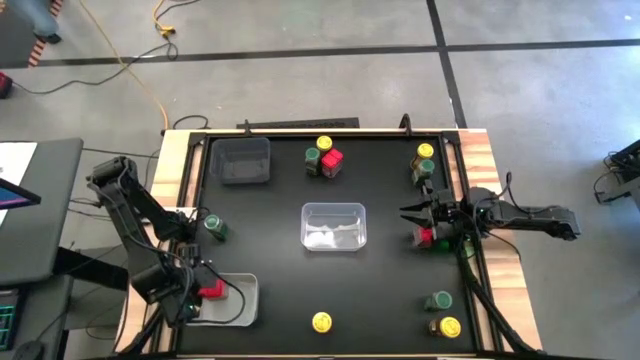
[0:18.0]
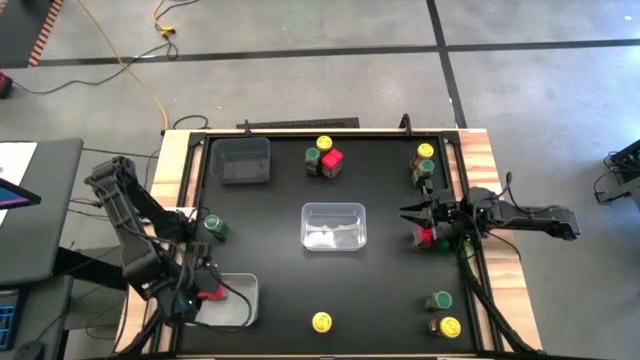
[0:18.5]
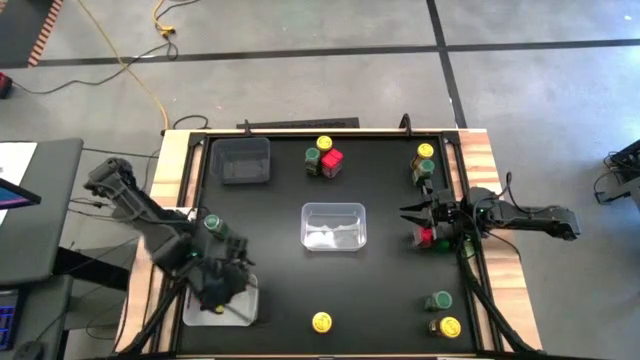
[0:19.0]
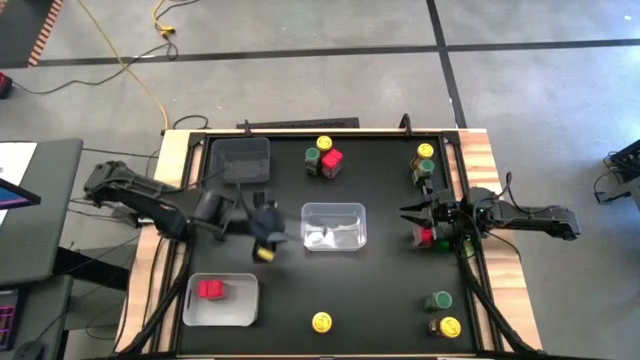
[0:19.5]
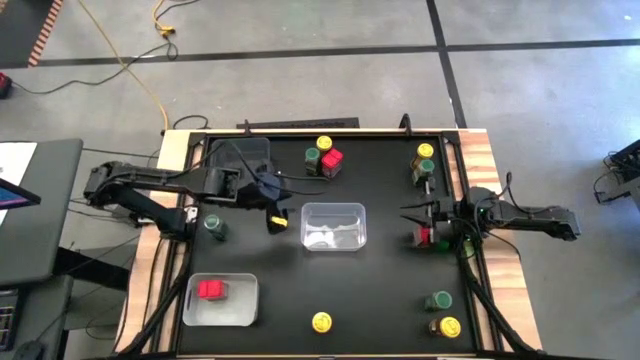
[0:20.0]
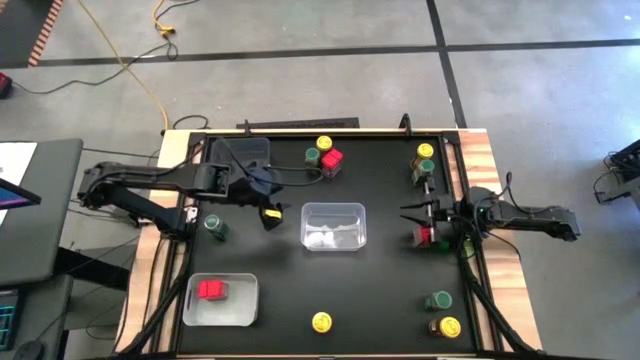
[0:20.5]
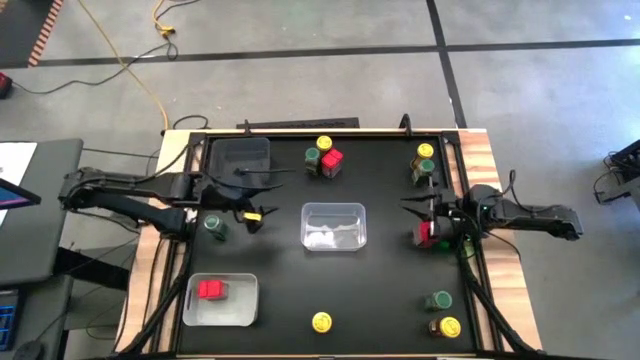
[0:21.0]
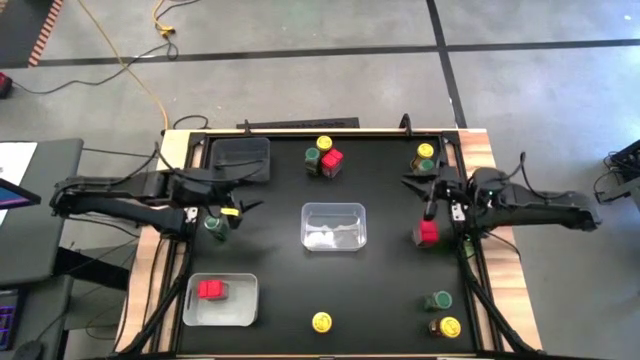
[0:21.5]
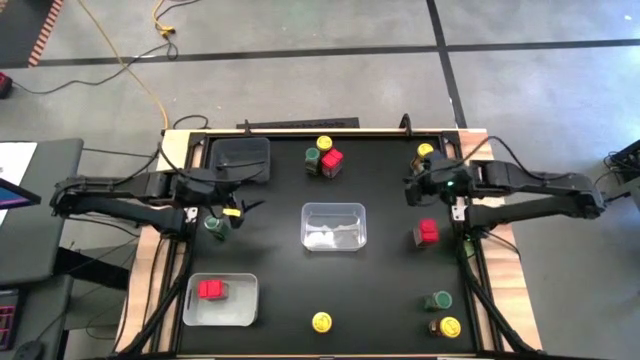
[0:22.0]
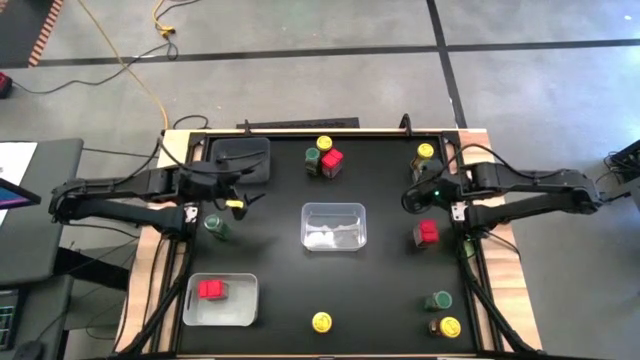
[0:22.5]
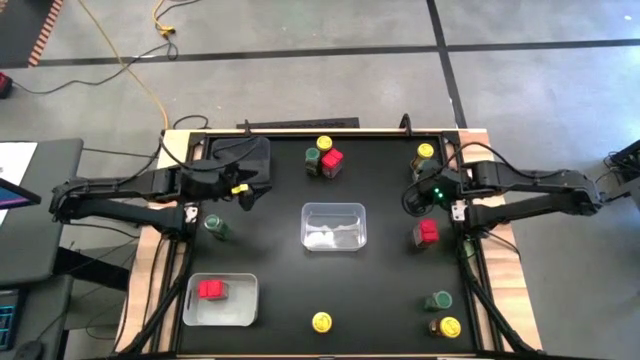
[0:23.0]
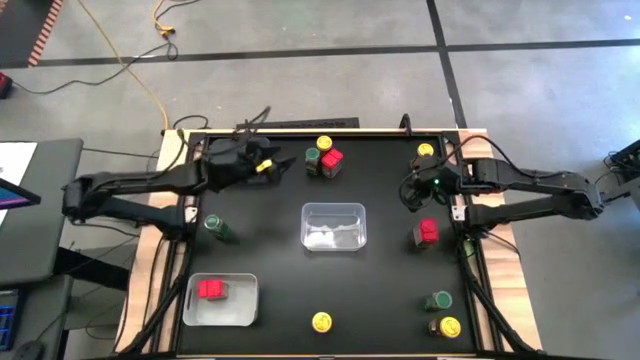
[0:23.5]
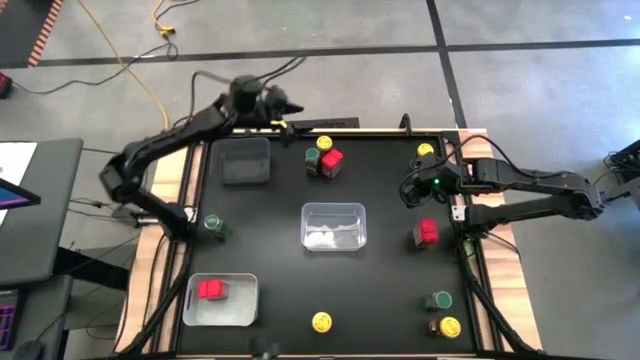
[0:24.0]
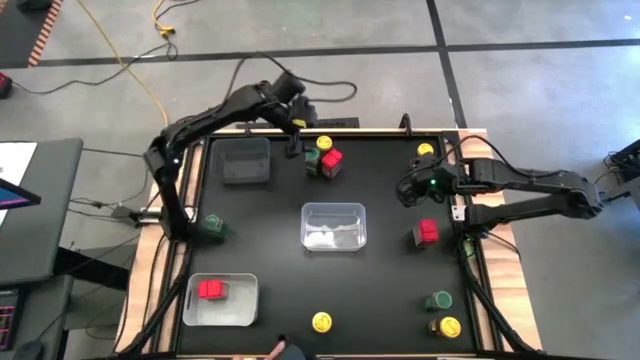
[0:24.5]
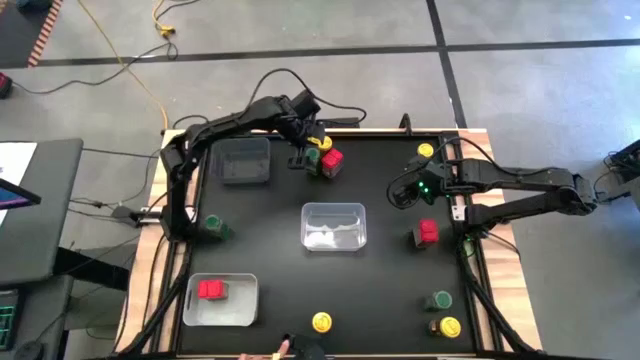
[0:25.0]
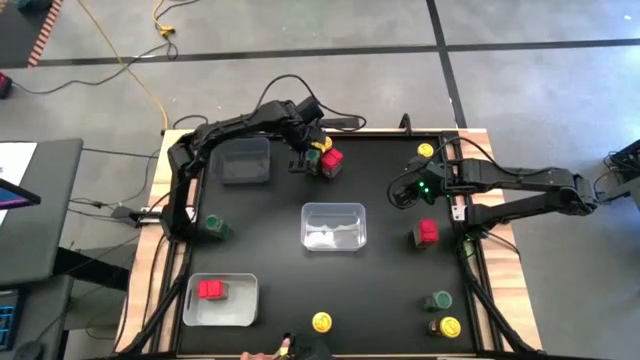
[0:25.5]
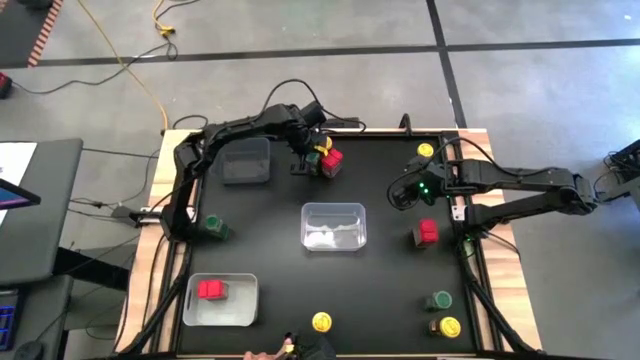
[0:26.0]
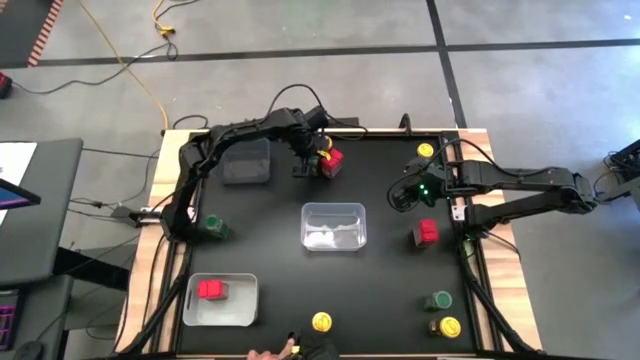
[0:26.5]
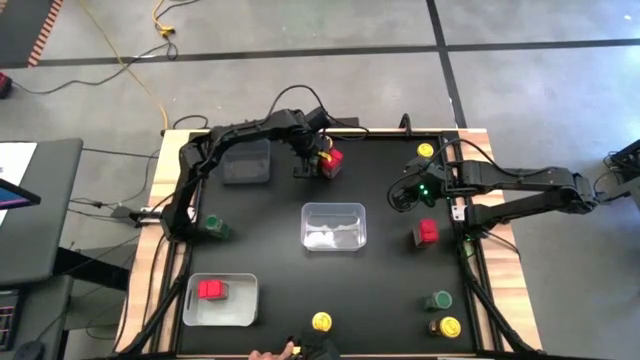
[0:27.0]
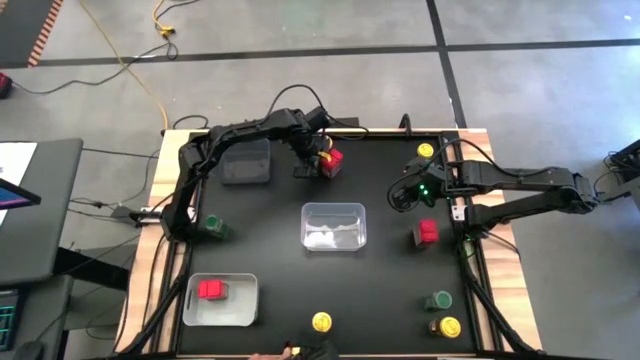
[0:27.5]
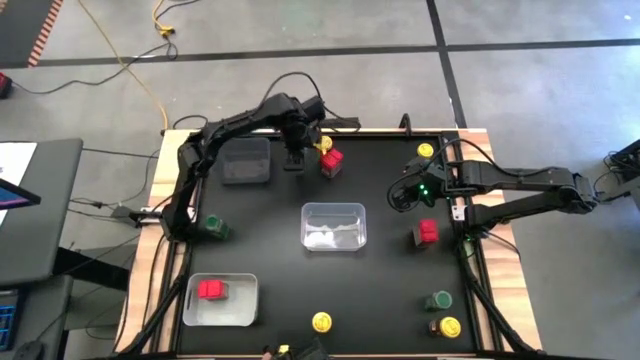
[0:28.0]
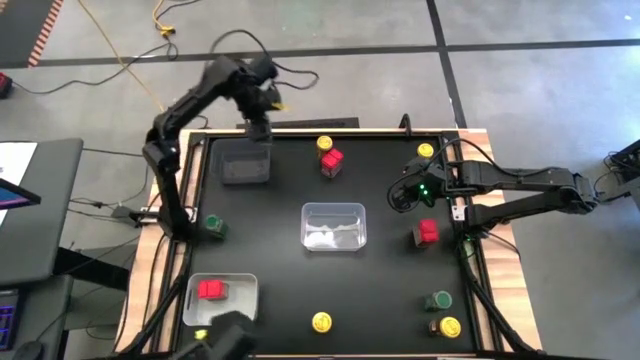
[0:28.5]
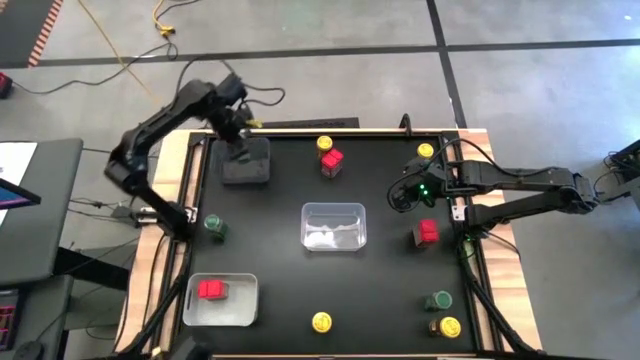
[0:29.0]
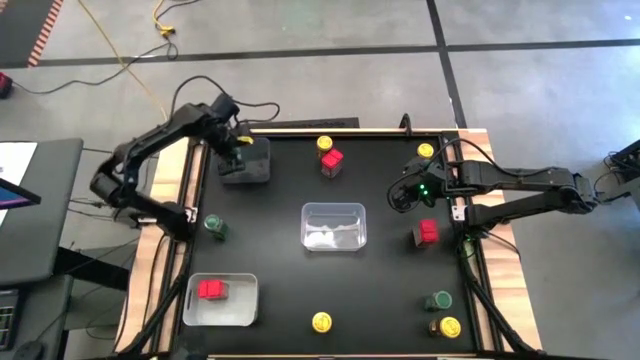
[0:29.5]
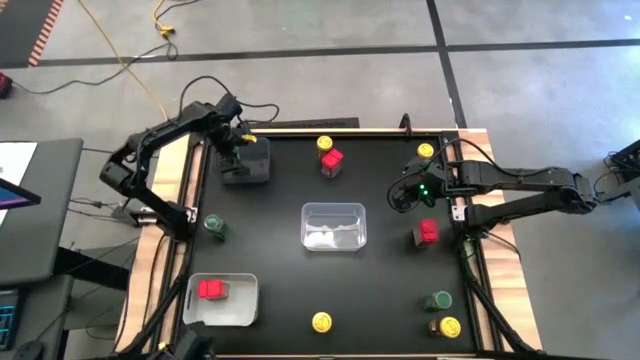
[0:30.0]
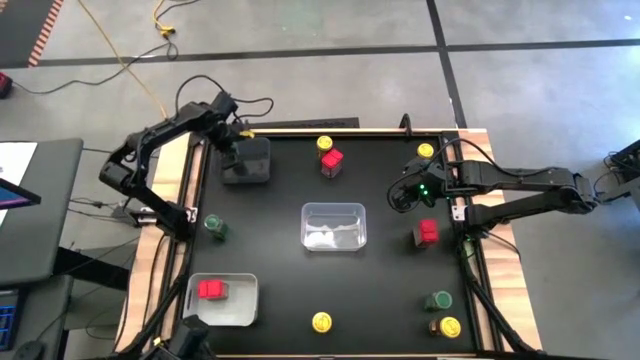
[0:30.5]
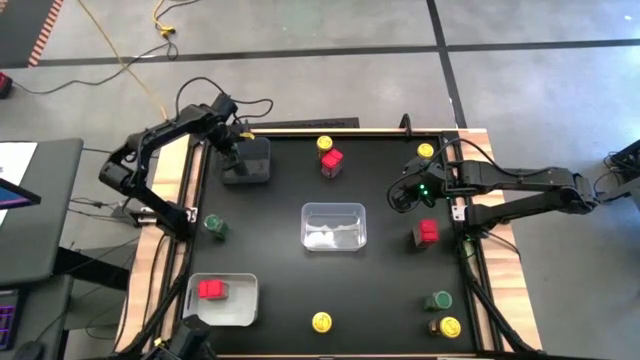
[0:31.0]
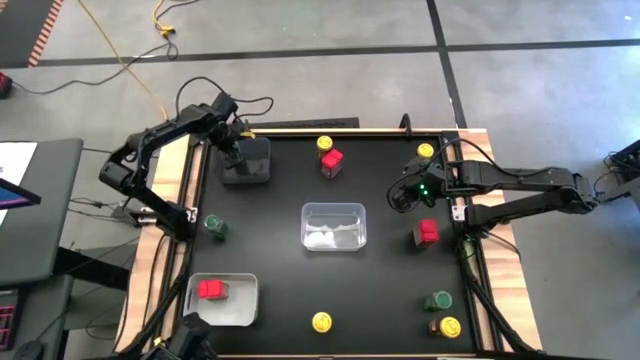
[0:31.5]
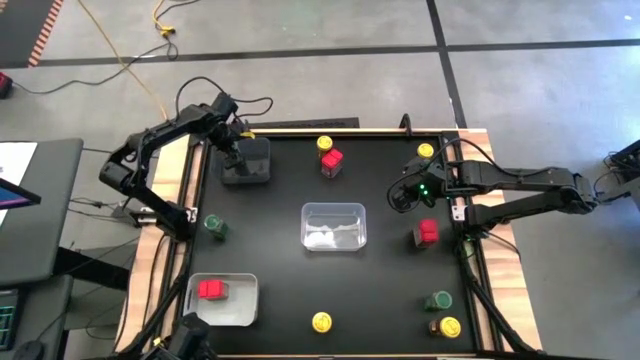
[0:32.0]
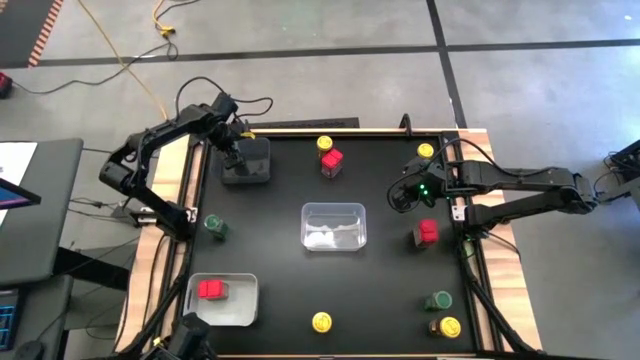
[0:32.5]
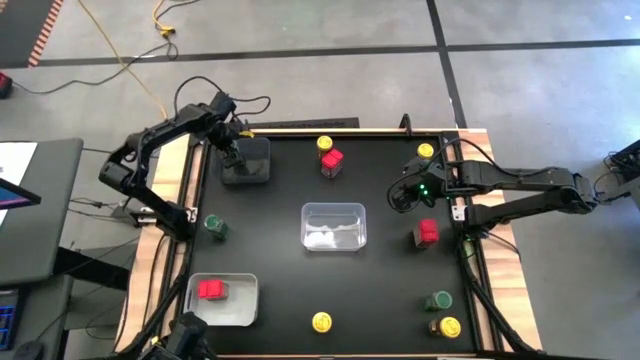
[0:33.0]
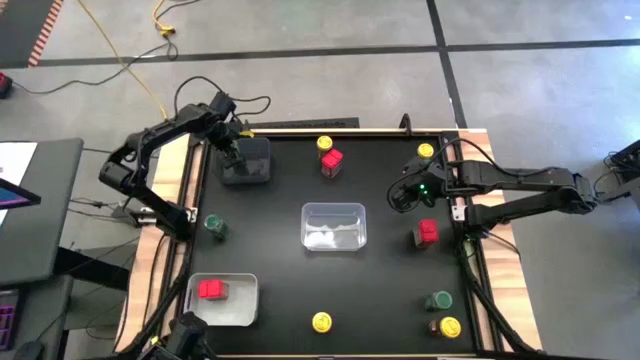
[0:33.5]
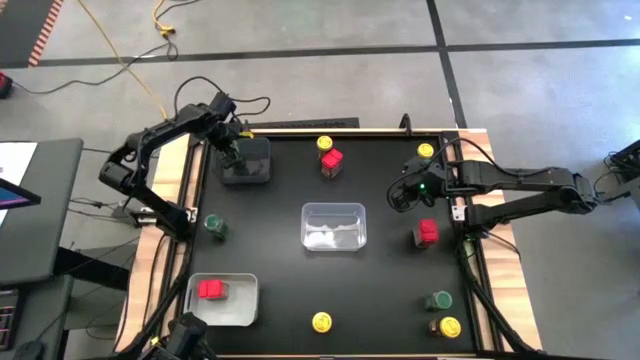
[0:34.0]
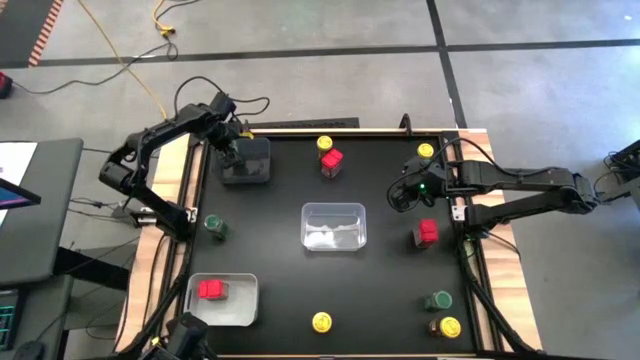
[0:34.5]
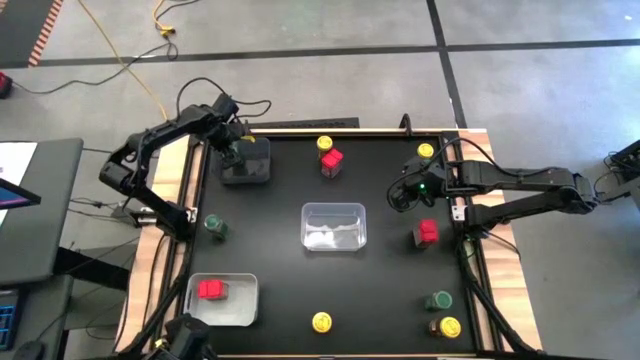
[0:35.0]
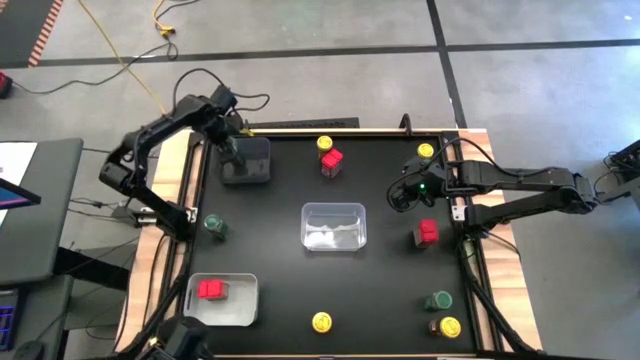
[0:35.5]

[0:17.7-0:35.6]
Task: Sort spices by type
Put the green seasoning bottle into the black bin

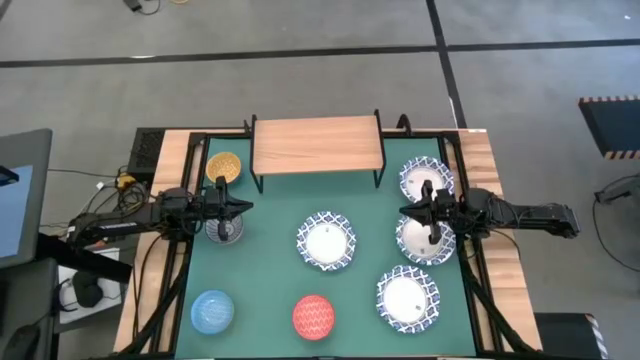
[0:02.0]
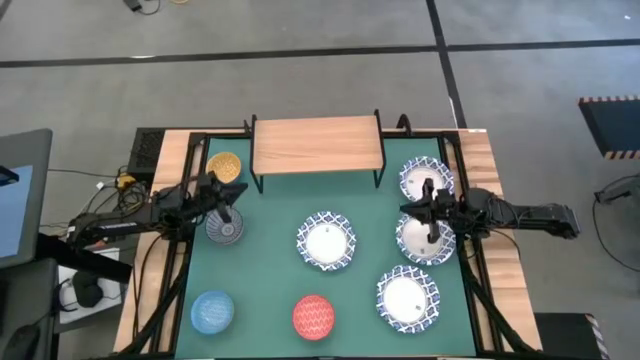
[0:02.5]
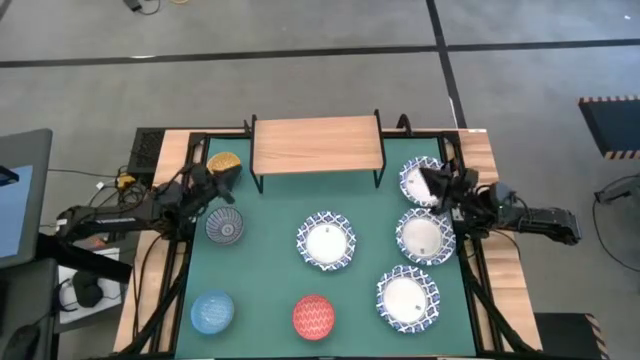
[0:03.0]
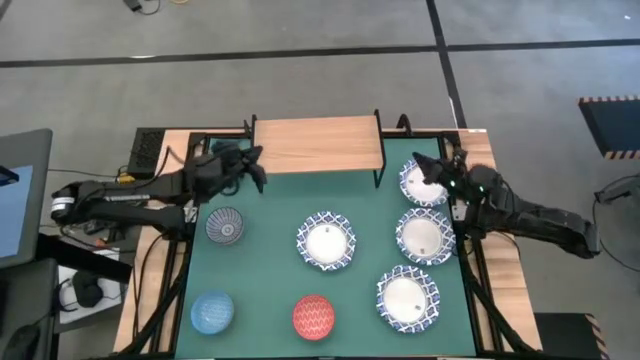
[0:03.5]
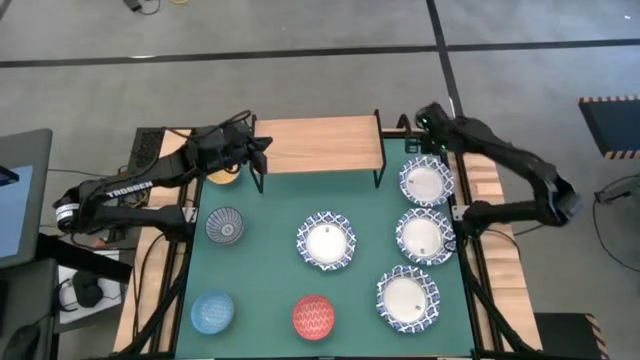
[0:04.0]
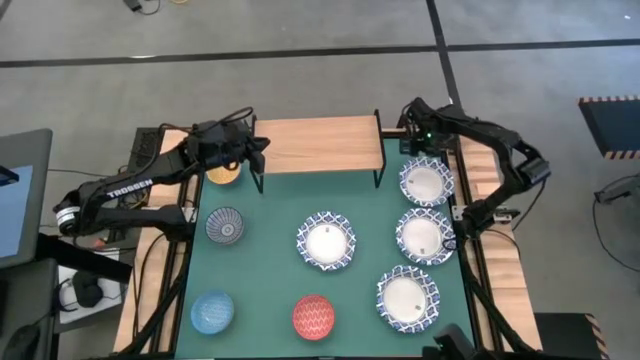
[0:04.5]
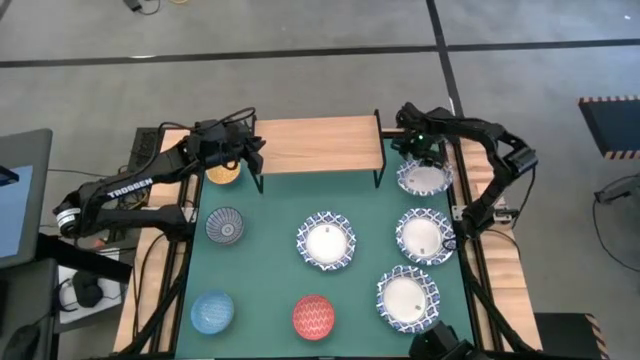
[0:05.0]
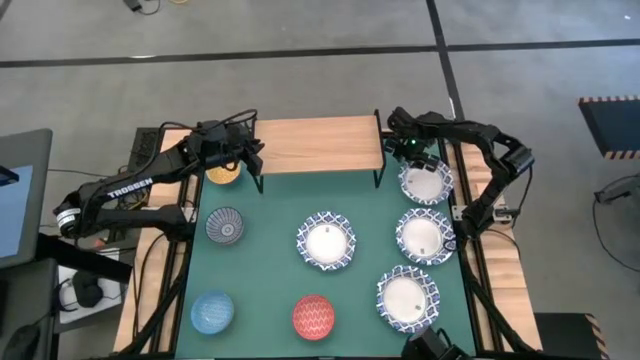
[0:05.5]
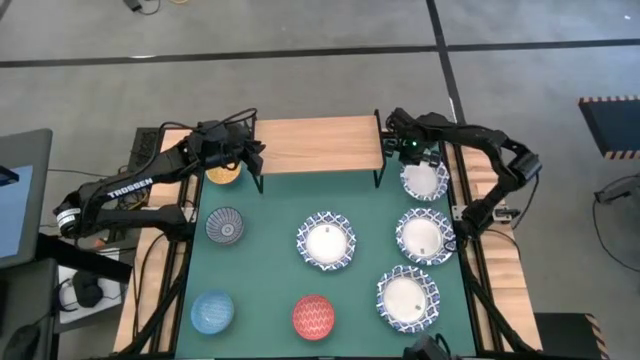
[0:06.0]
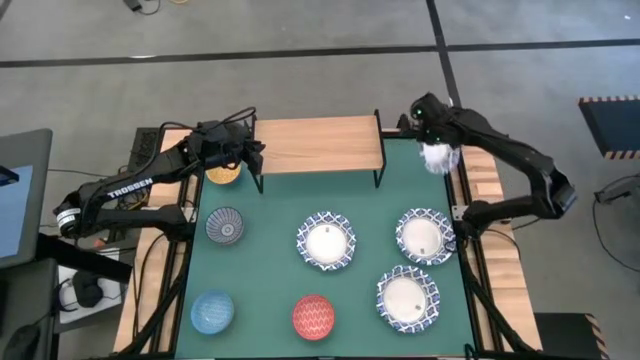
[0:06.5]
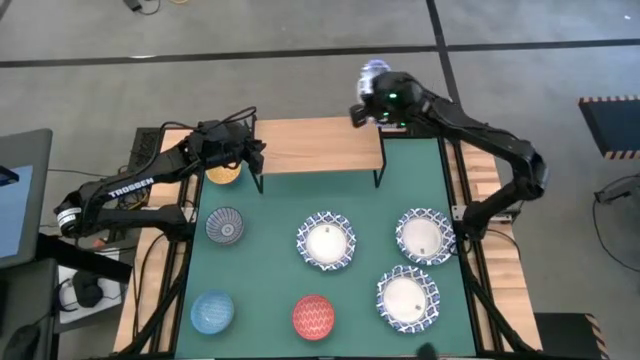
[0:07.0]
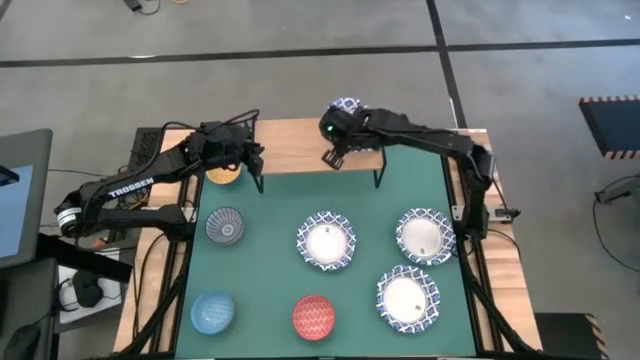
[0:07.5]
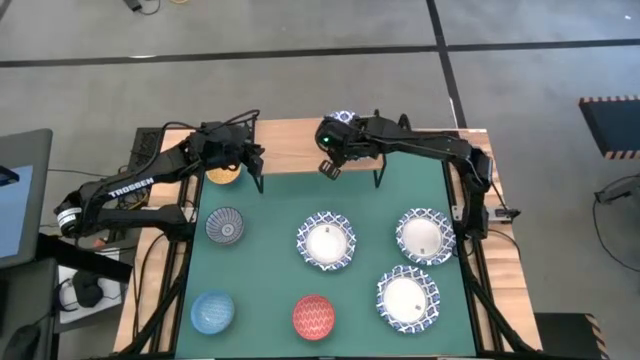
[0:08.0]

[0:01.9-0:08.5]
Task: Place and stack bowls onto a shelf
Put the top white bowl on the shelf
